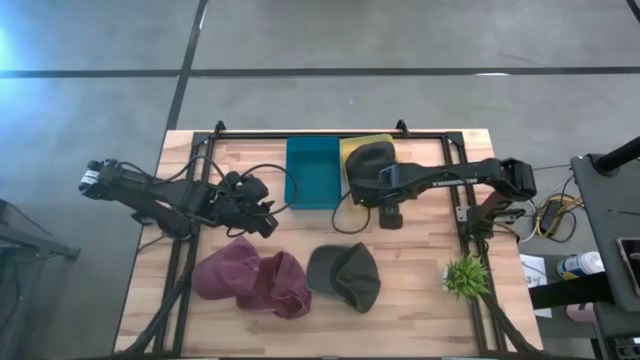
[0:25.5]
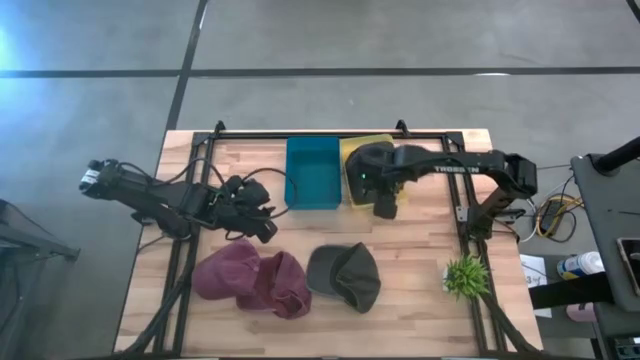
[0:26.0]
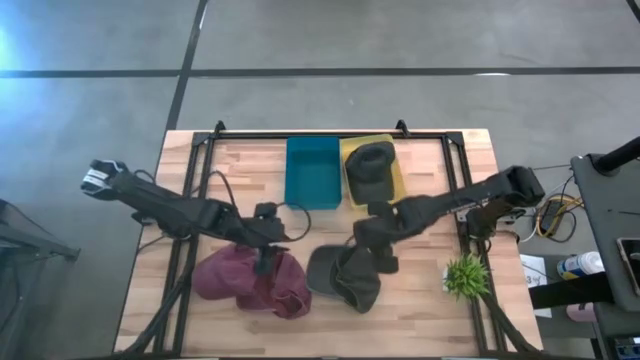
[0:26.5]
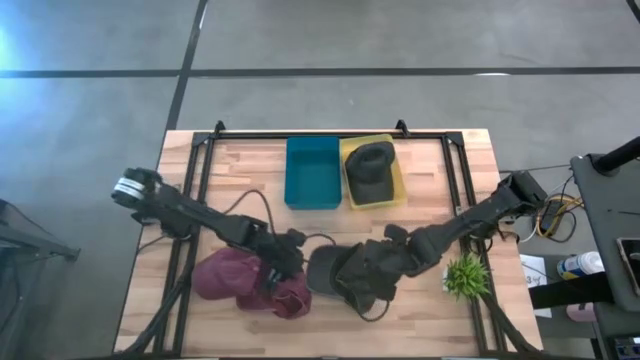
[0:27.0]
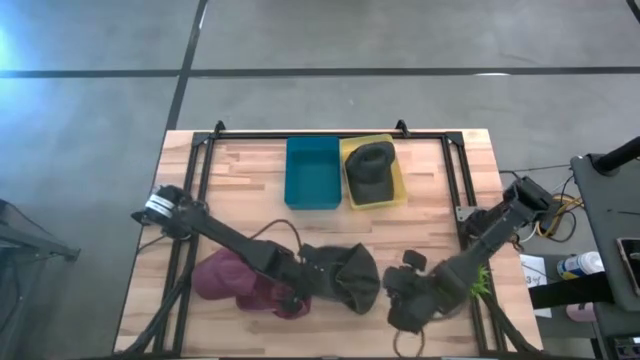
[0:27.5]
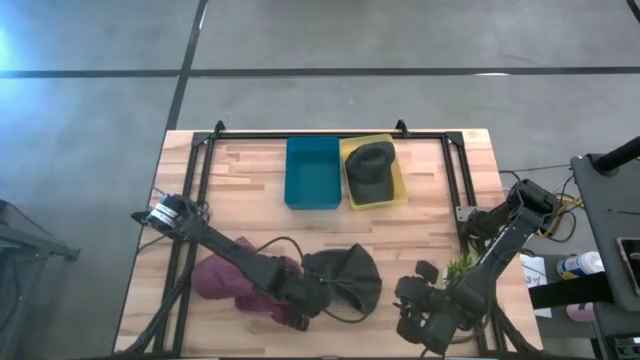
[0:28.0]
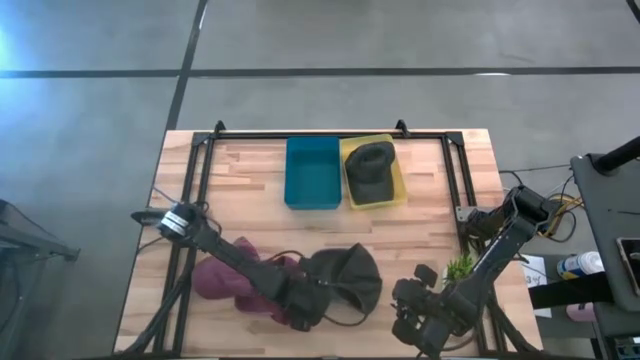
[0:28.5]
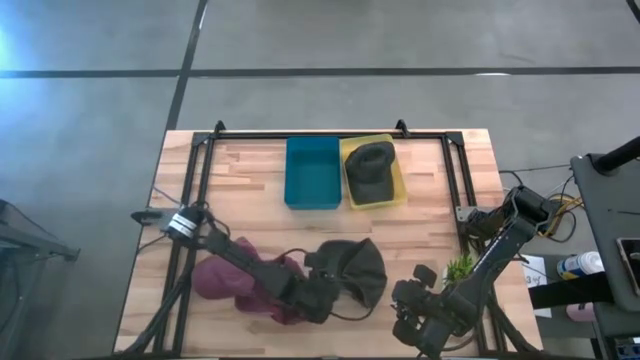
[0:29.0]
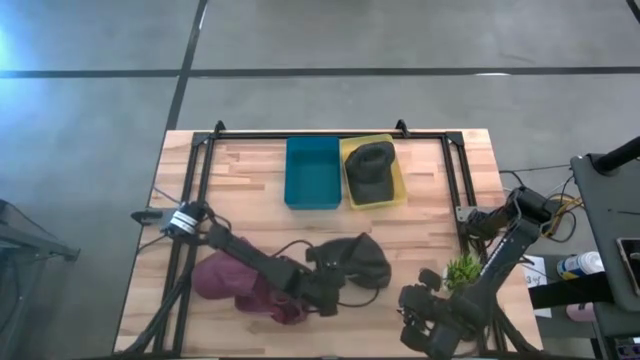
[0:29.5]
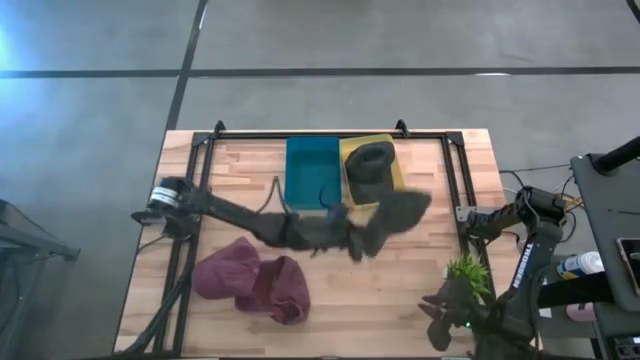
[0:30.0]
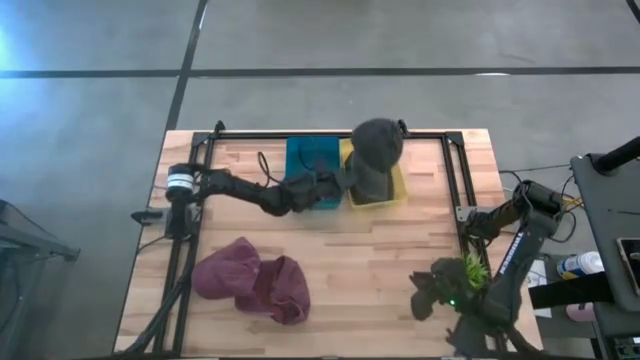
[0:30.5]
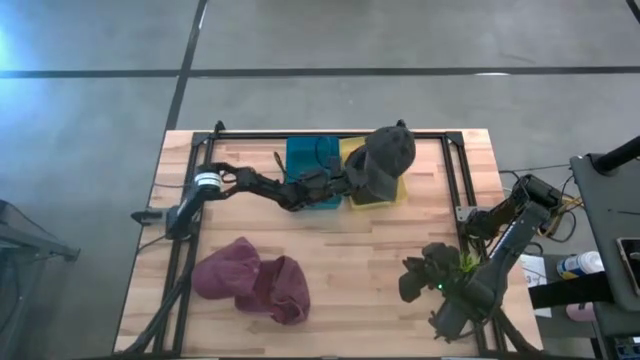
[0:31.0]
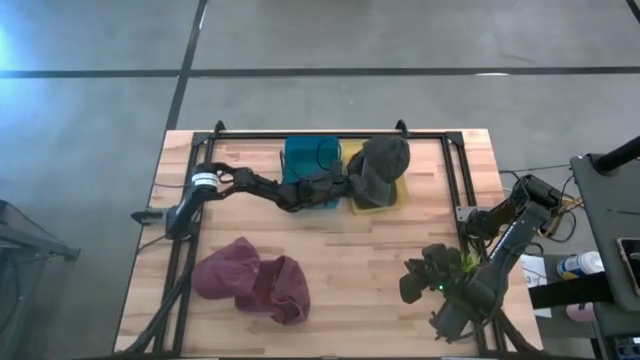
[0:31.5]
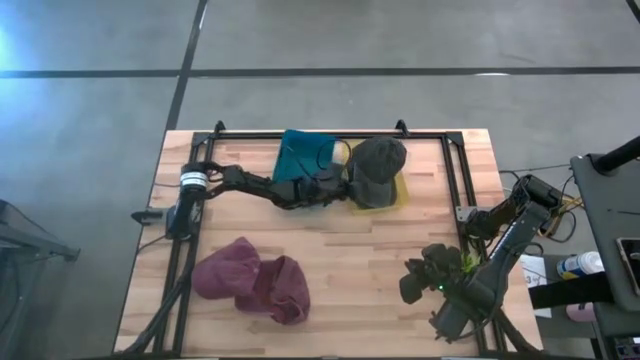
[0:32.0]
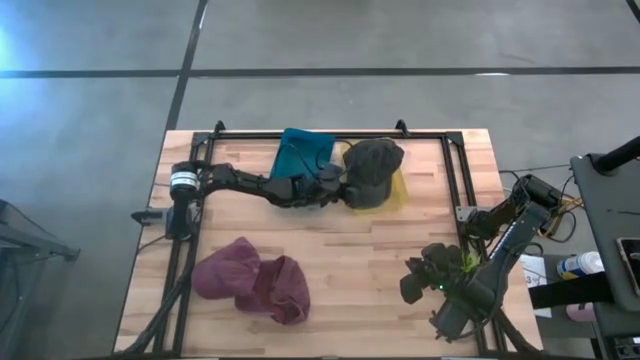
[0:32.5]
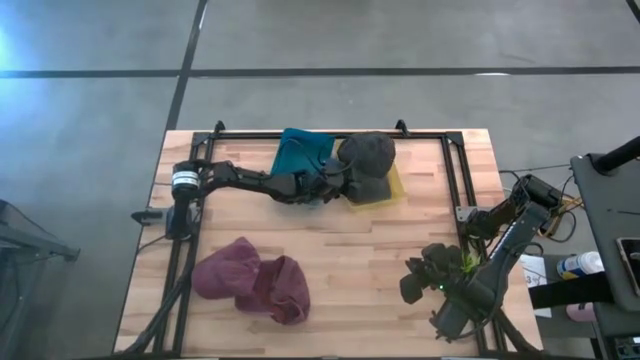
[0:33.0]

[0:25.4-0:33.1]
Task: Pick & Place hat
Put the gray cap into the yellow bin

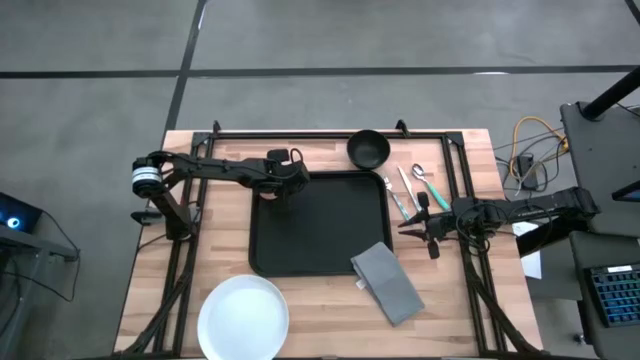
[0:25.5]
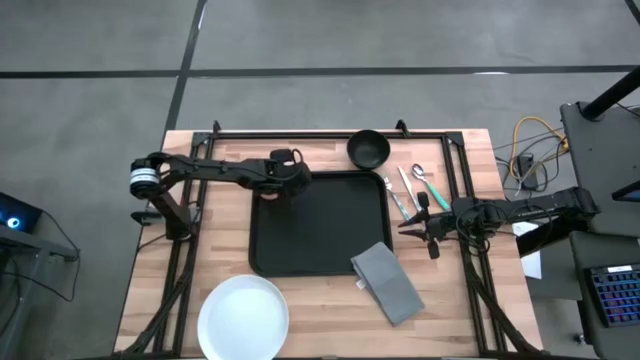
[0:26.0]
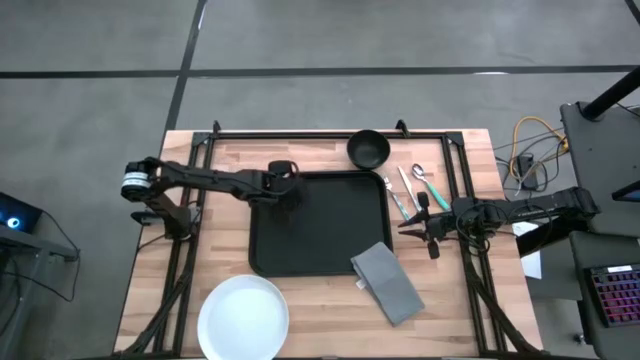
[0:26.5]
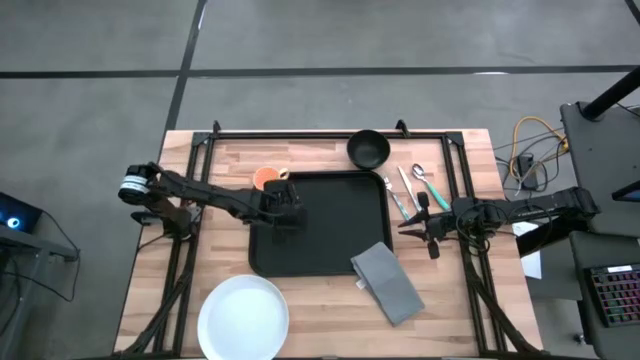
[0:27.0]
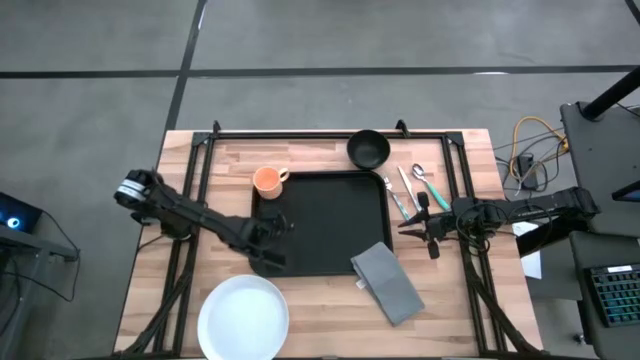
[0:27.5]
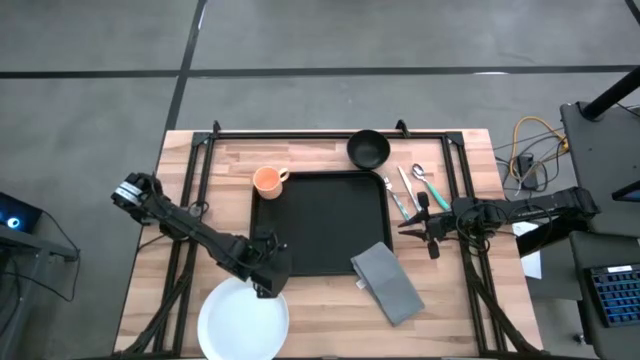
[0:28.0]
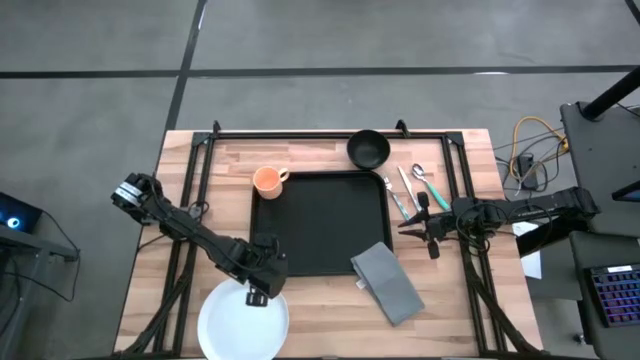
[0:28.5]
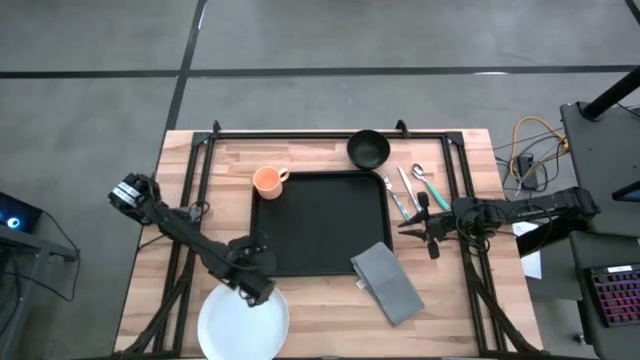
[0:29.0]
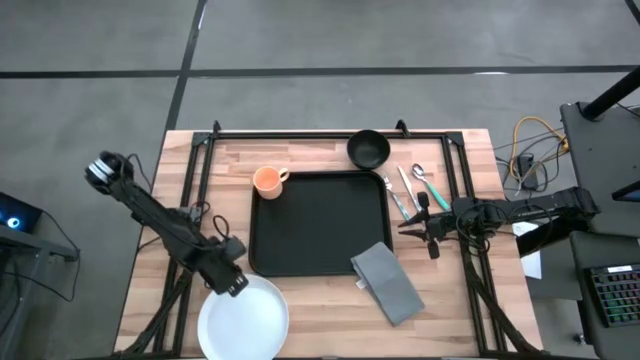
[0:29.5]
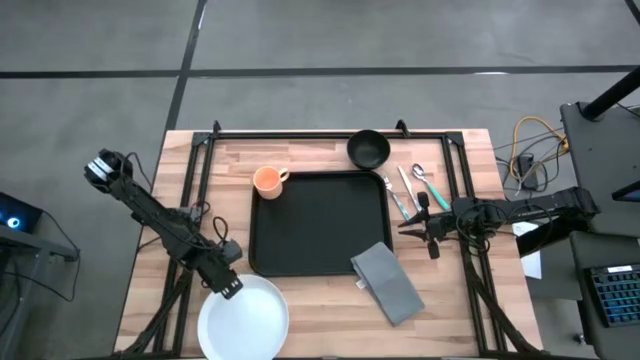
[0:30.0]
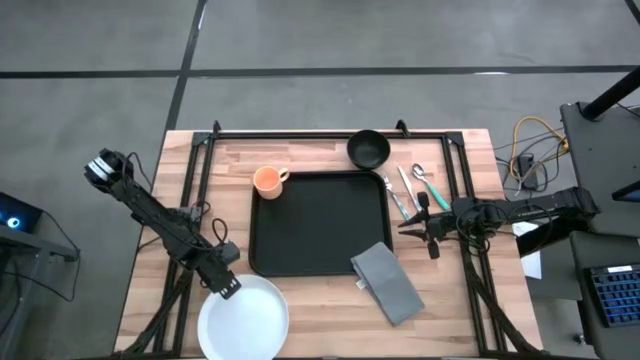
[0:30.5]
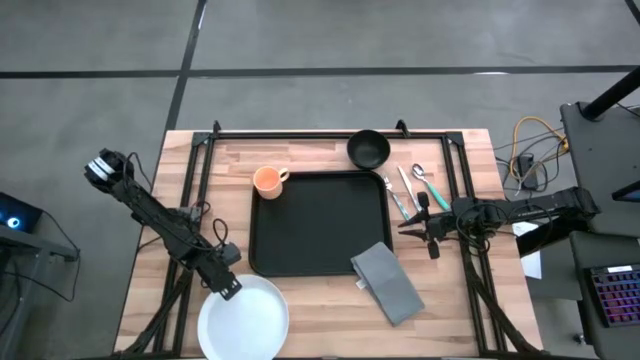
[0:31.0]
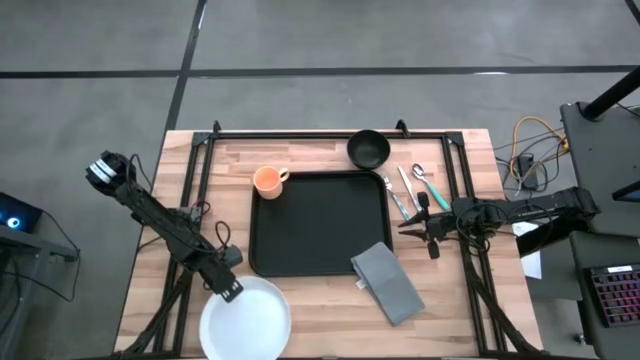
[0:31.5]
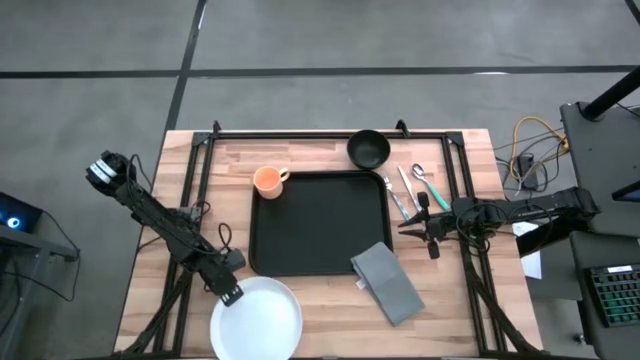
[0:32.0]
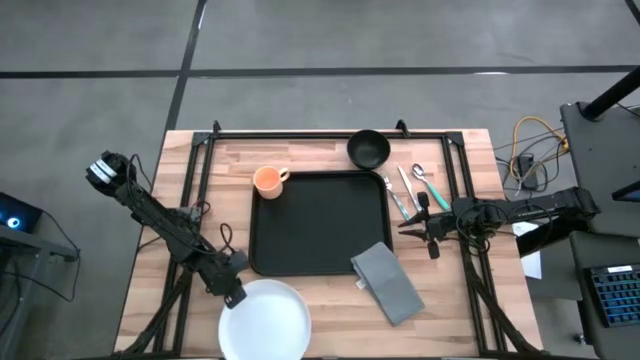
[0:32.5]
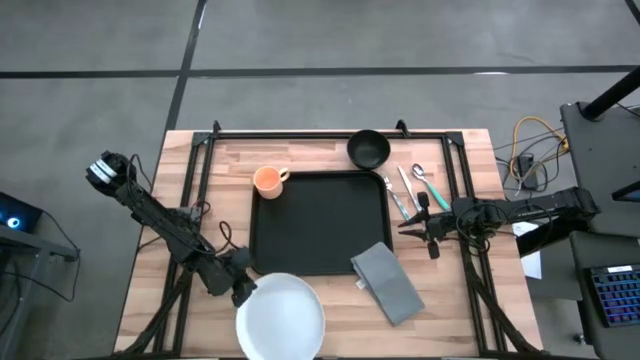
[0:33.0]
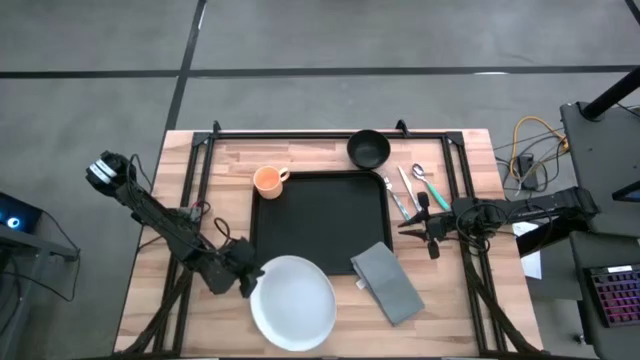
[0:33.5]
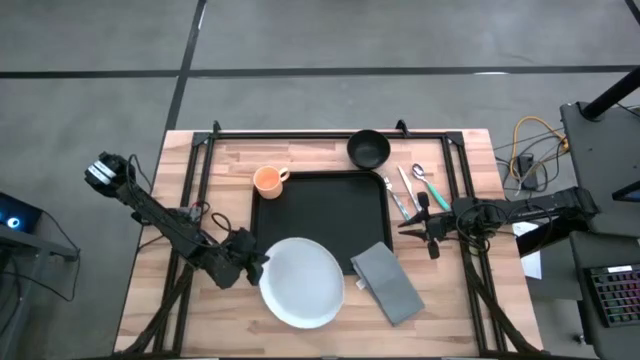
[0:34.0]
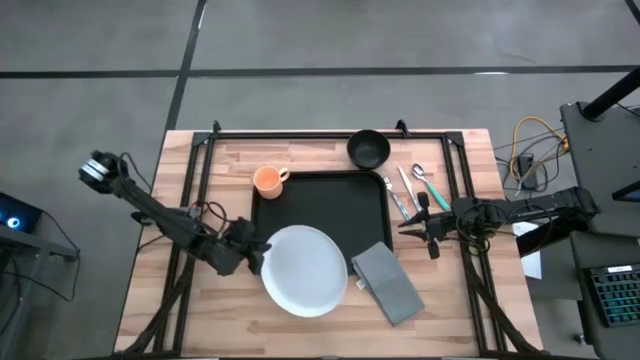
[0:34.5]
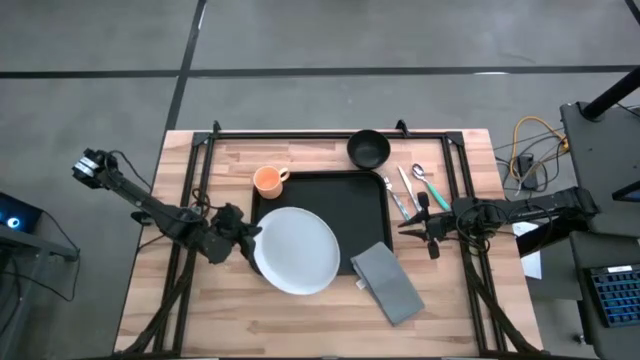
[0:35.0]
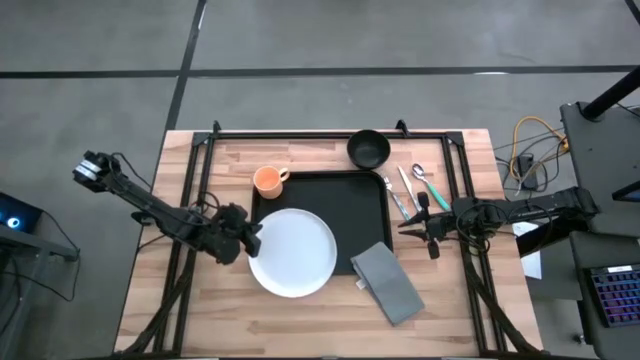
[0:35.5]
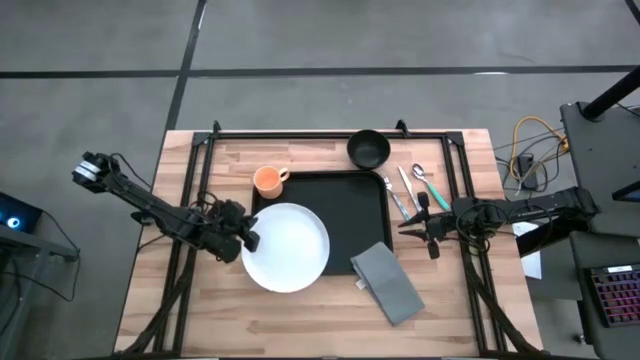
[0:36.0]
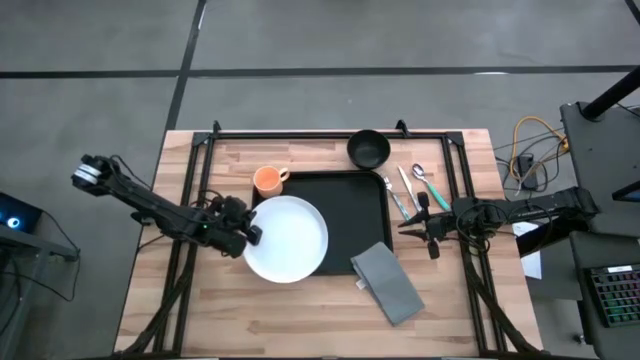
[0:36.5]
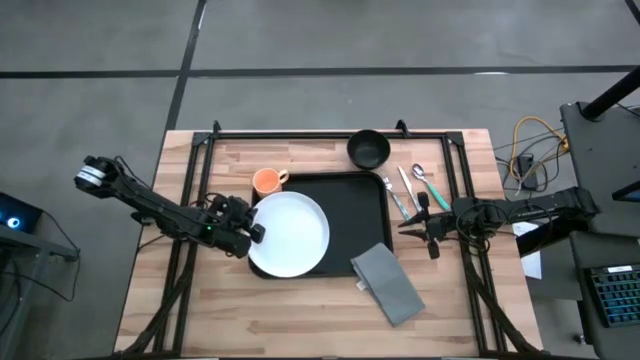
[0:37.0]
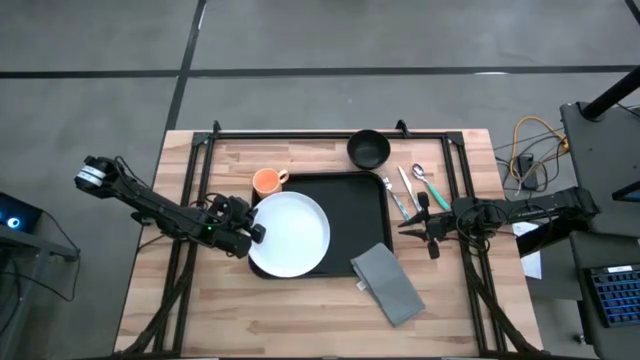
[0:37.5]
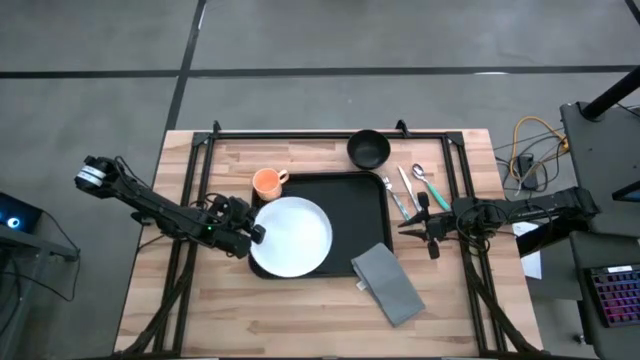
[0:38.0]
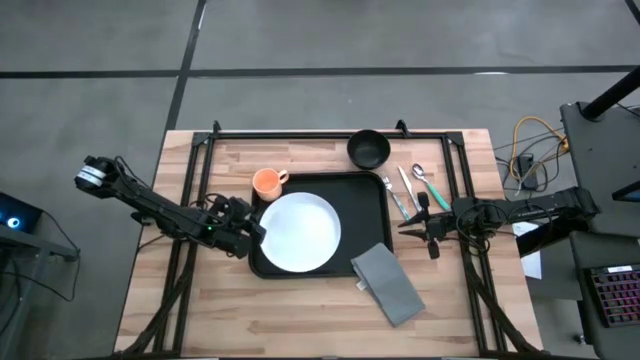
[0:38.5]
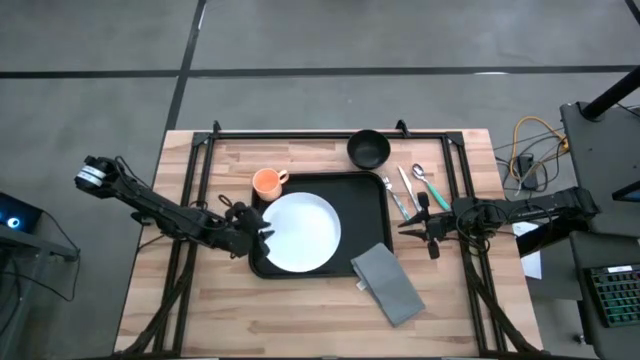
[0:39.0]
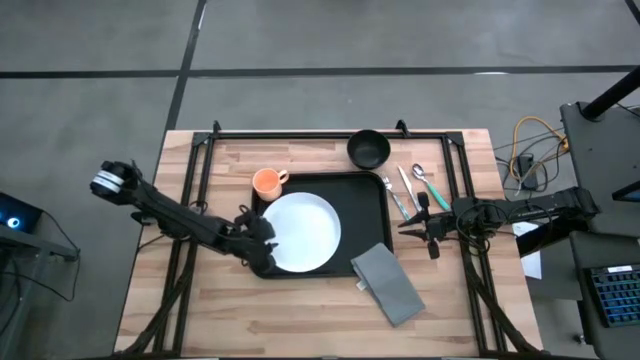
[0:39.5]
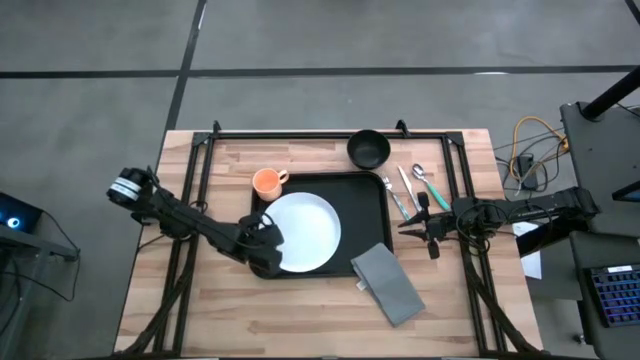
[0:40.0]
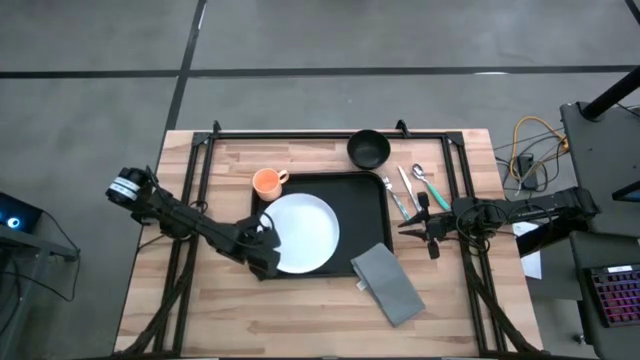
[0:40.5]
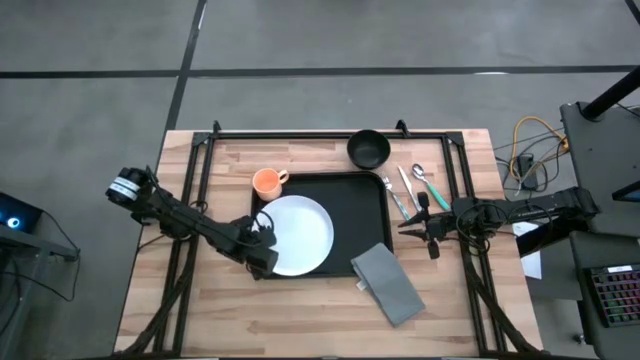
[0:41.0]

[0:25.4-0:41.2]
Task: Set up tray
Put the white plate at the bottom of the yellow mug on the black serving tray
